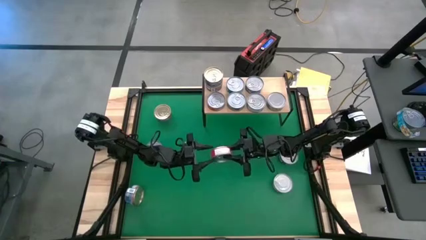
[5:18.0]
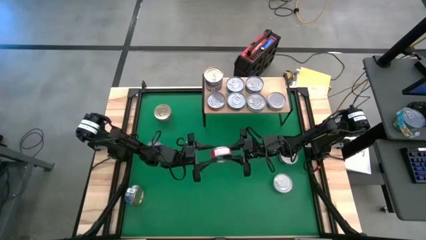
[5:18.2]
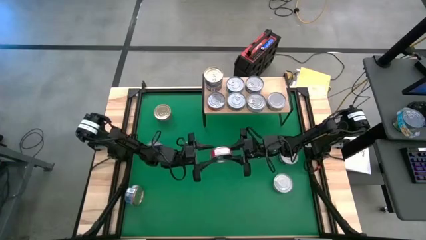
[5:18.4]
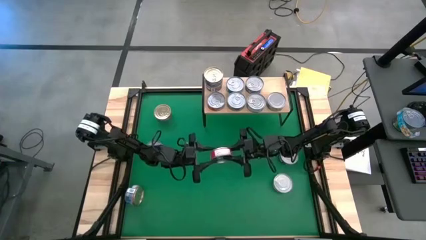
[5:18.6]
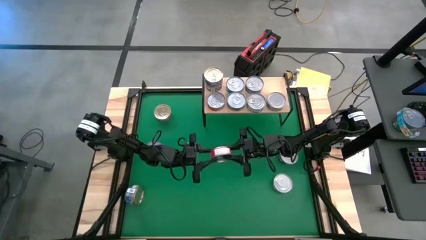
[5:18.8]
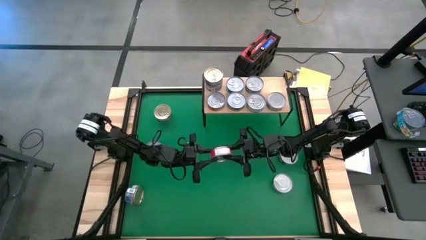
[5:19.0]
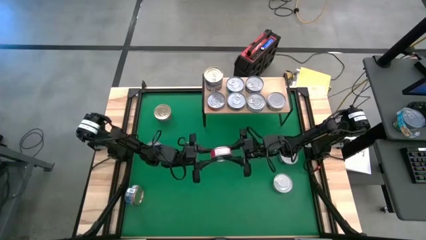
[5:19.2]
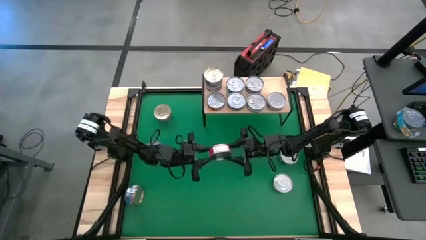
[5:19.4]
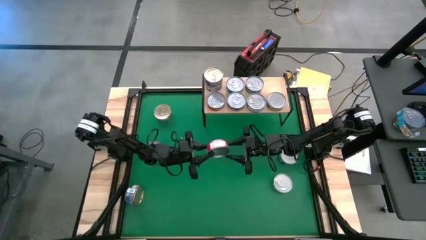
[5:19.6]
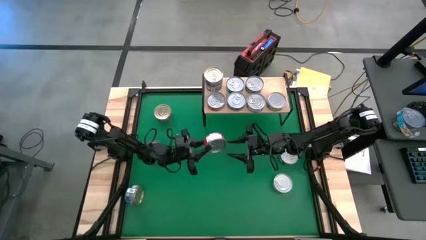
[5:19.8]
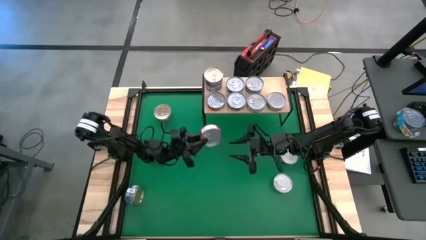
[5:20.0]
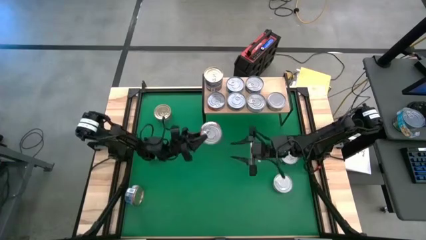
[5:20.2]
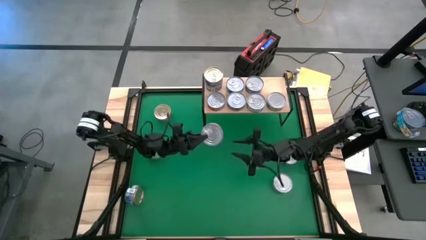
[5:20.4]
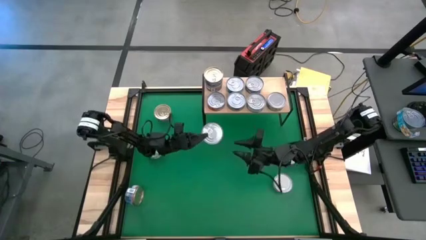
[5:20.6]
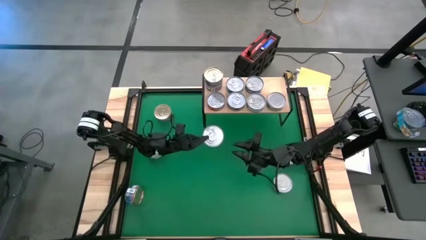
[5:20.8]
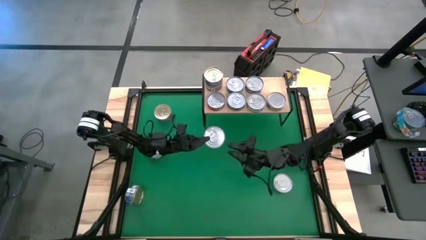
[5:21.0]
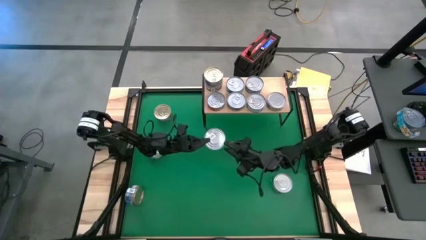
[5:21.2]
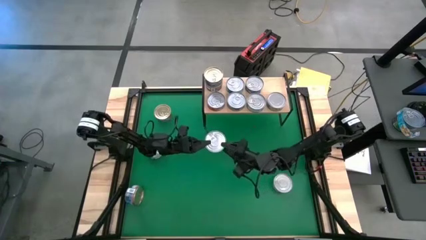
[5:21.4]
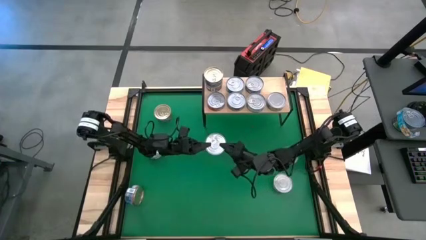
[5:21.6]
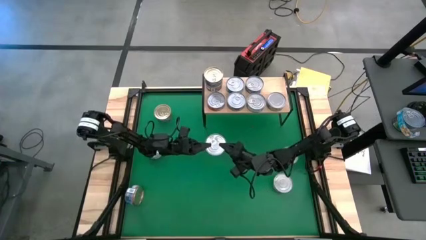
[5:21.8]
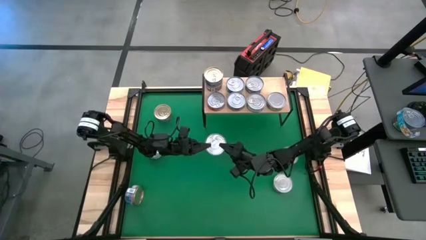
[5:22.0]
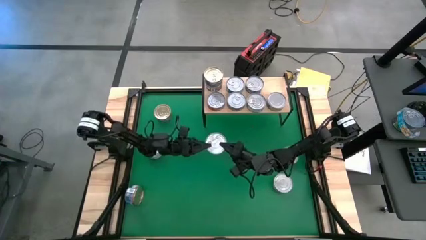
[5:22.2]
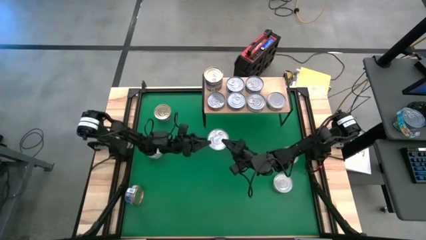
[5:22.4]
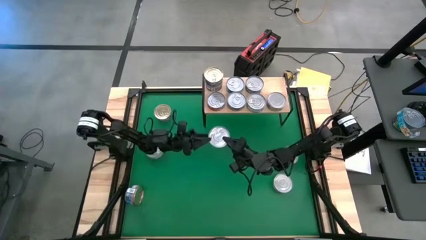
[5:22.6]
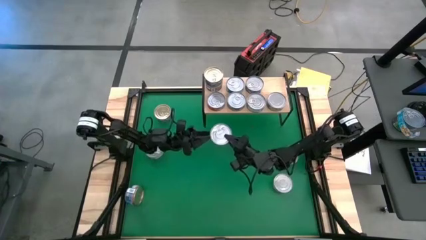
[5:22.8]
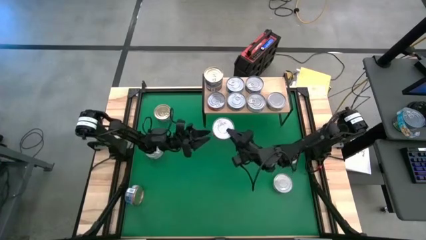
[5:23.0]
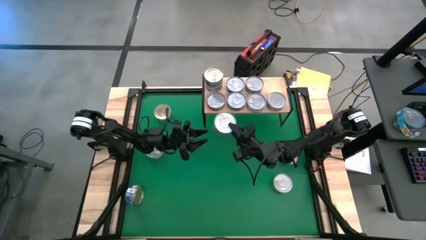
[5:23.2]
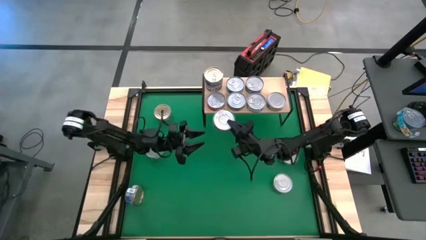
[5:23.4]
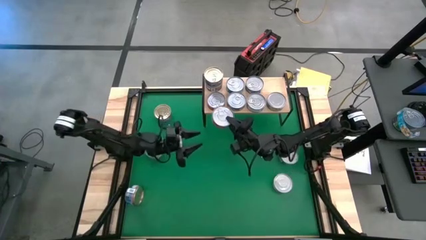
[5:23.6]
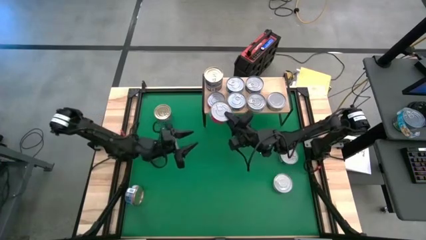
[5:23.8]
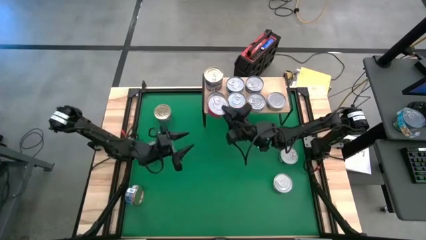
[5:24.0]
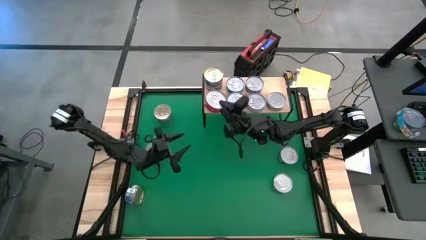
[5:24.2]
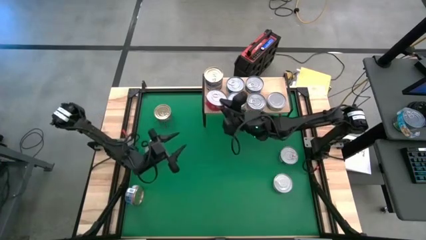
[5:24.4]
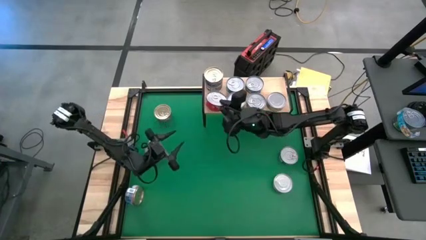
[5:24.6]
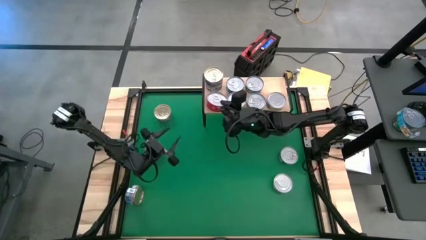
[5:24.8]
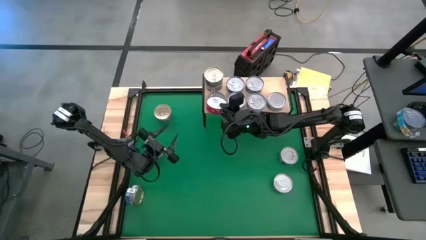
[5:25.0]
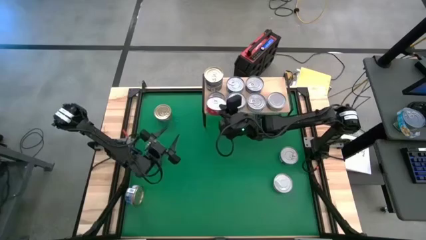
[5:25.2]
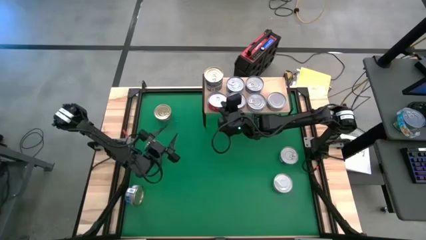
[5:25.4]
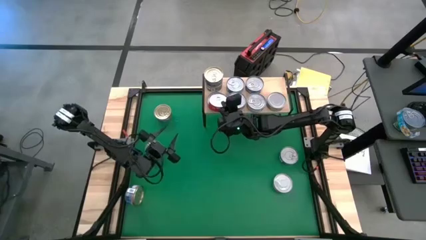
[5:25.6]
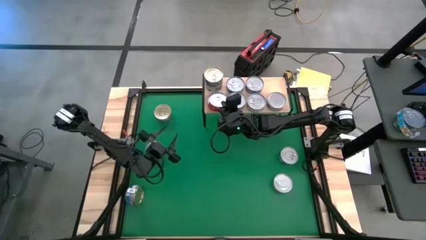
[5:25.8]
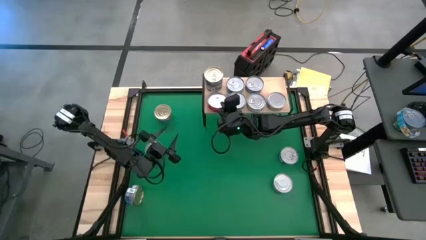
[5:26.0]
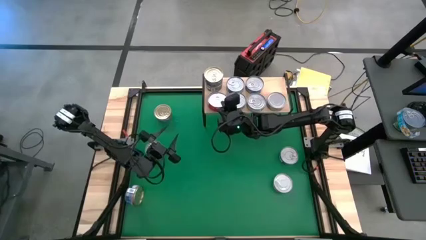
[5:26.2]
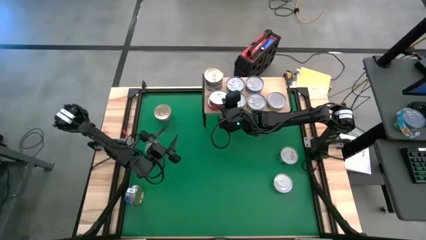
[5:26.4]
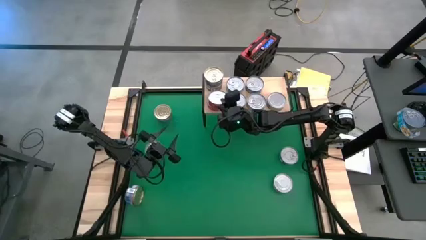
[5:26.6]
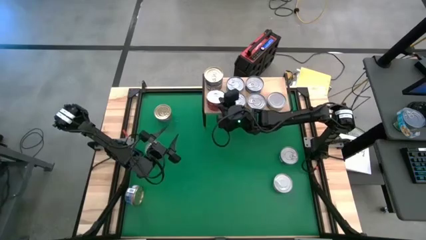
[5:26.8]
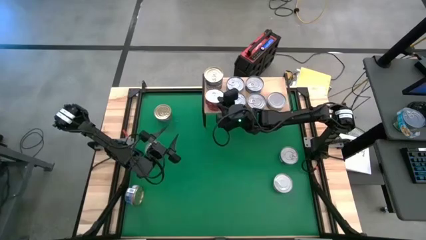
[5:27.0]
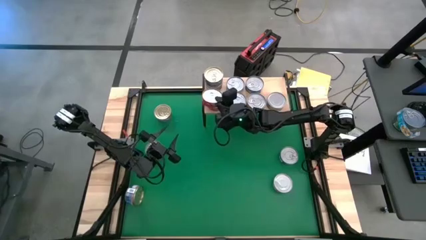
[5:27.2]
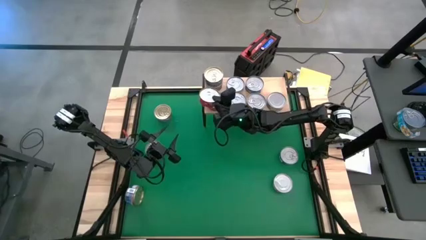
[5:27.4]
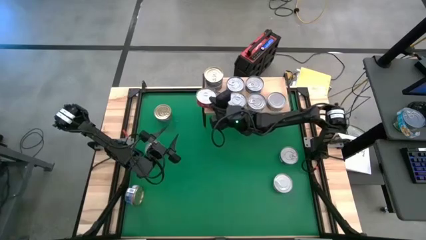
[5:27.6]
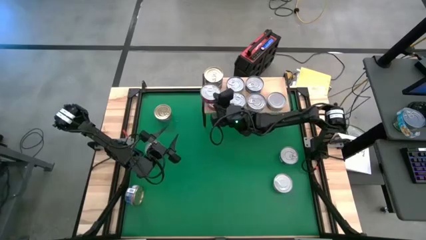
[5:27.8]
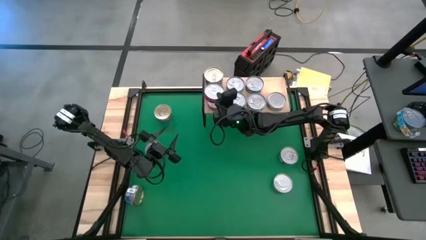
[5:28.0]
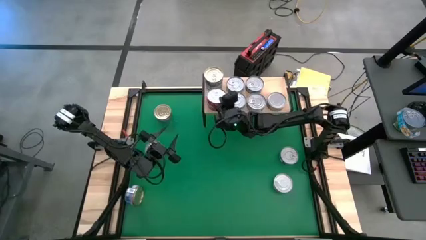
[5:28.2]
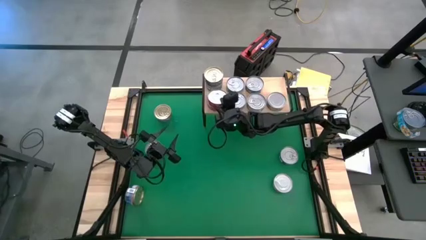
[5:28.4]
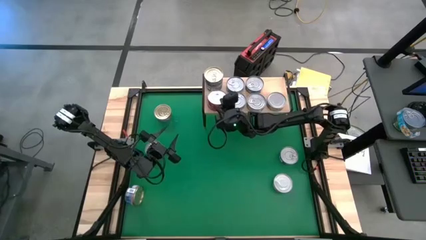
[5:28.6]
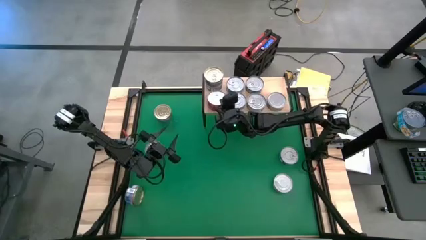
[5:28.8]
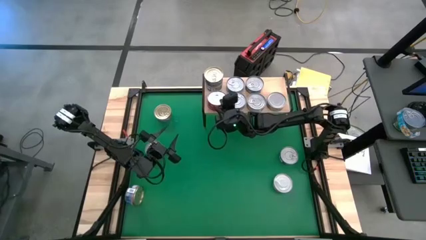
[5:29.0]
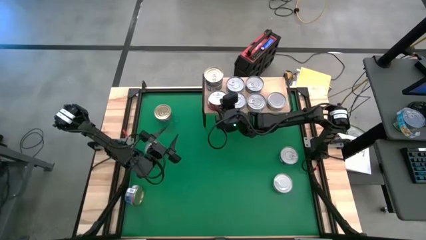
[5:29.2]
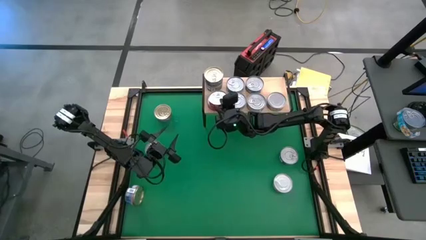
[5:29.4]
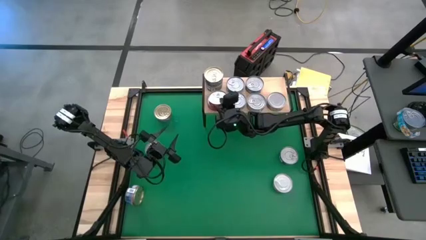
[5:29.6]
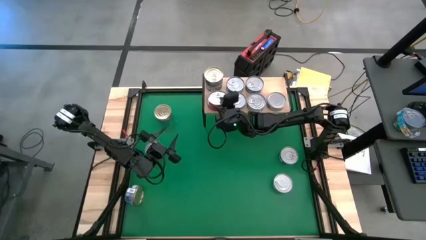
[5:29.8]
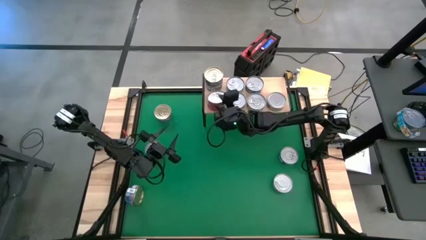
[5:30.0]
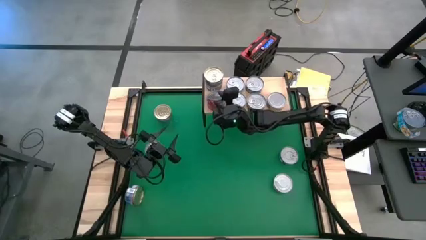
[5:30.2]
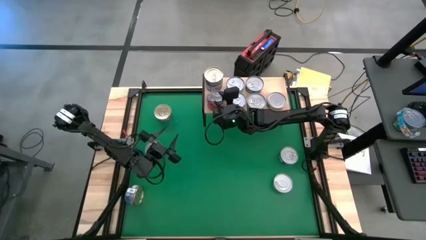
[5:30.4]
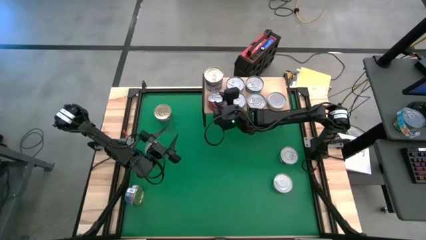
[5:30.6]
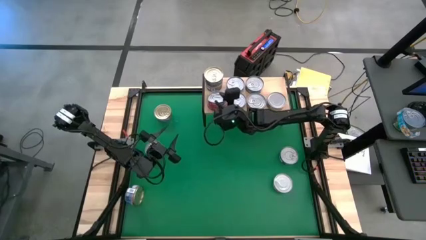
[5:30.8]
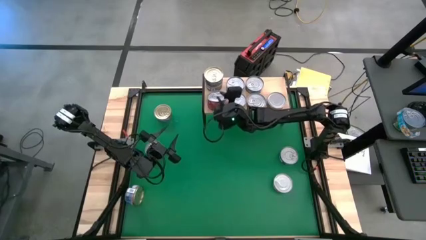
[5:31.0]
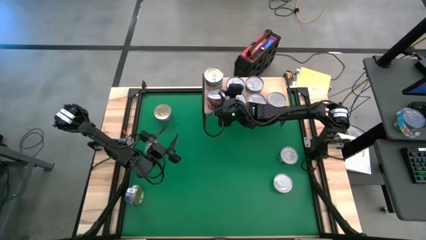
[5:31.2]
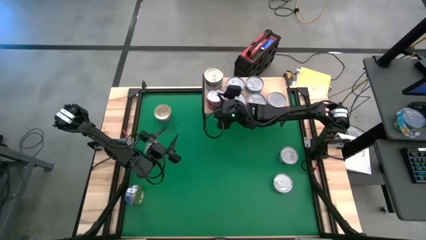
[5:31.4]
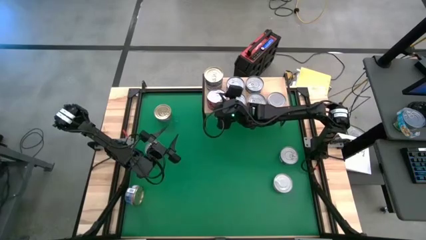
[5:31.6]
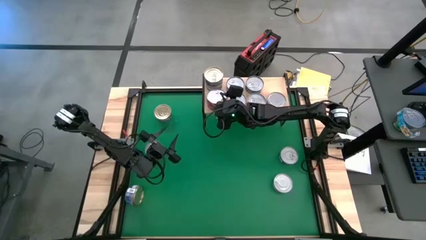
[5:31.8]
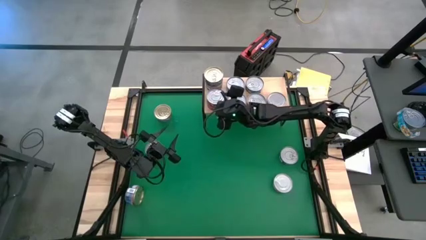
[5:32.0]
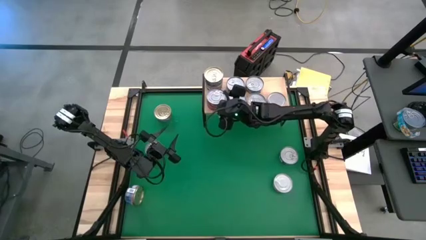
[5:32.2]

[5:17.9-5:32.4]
Task: Stack canned seafood by type on shelf
Stack the red tuna can on top of the other red tuna can on the shelf
